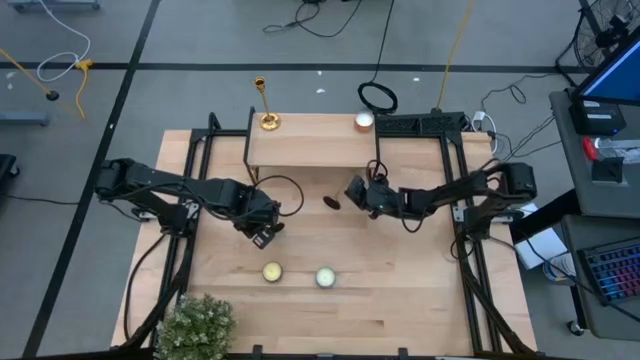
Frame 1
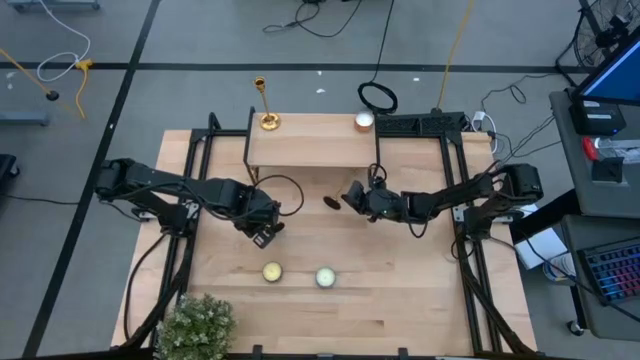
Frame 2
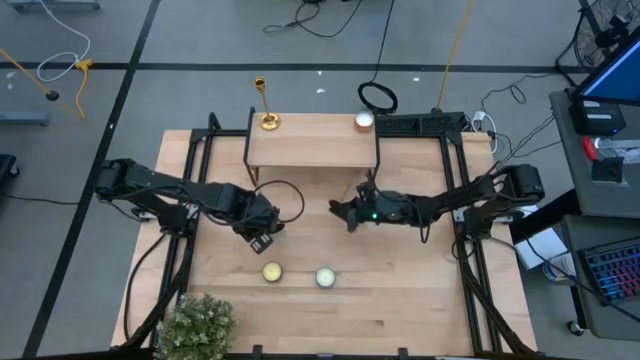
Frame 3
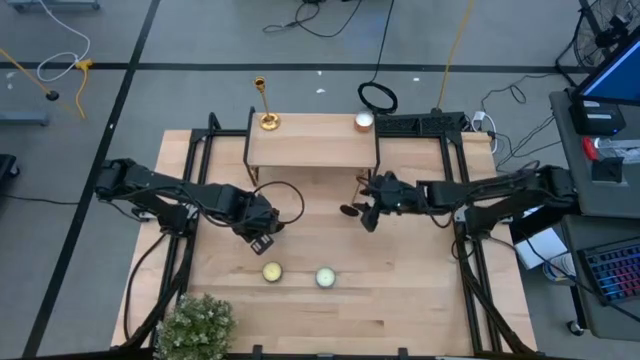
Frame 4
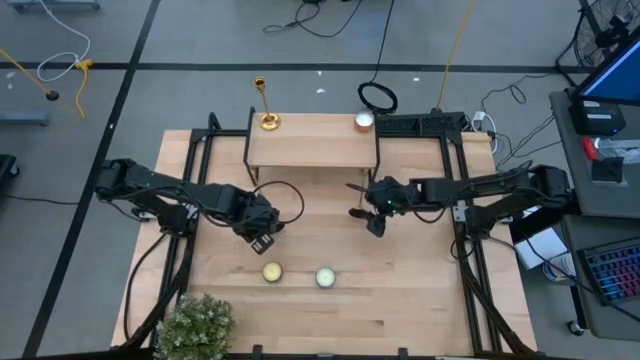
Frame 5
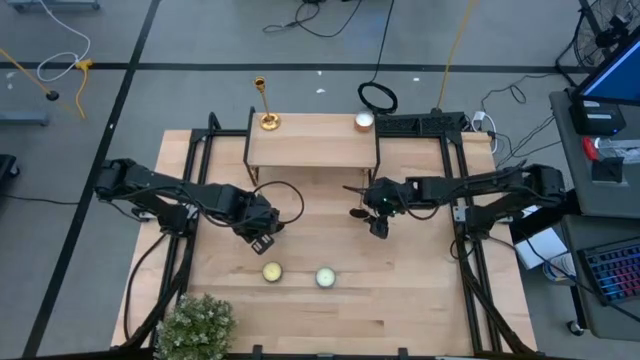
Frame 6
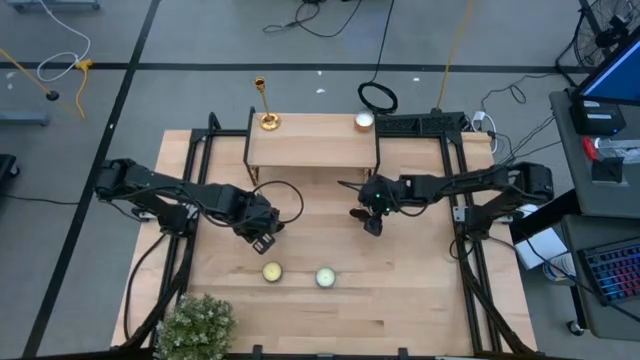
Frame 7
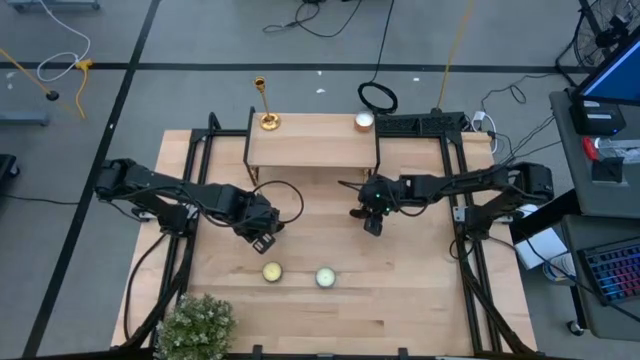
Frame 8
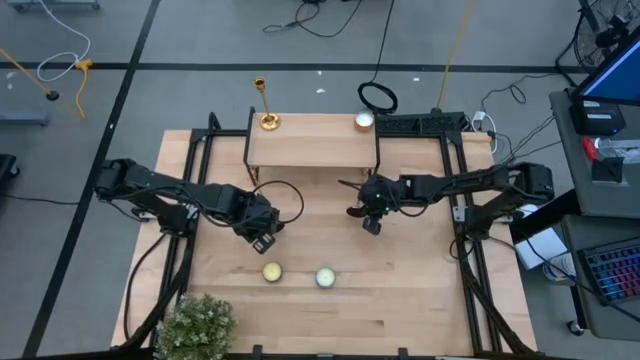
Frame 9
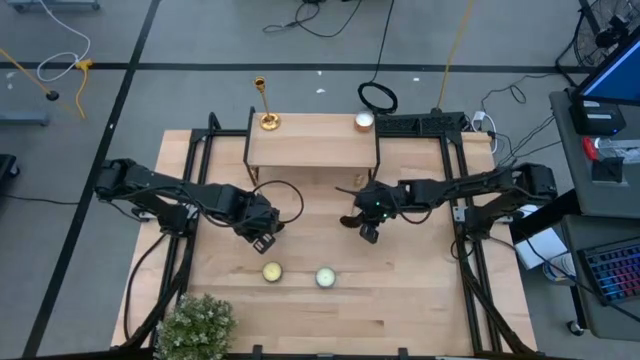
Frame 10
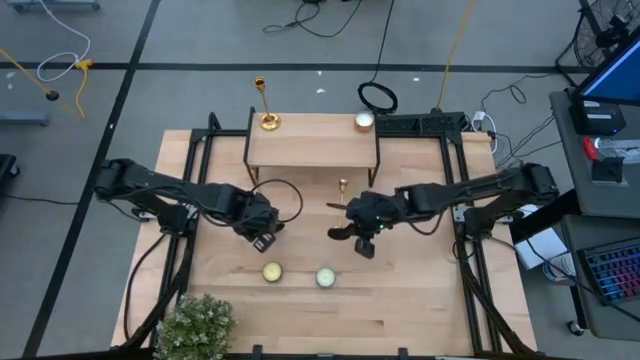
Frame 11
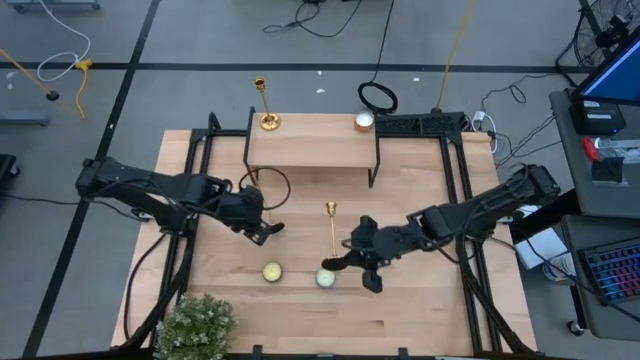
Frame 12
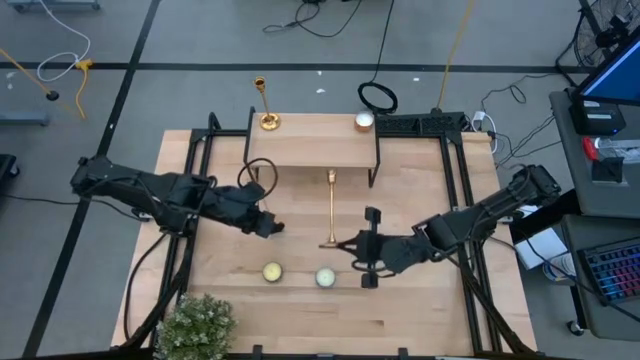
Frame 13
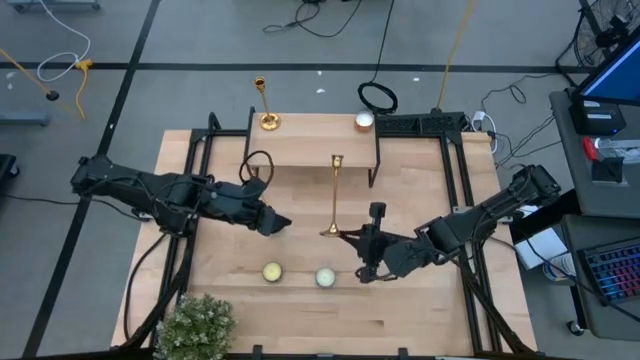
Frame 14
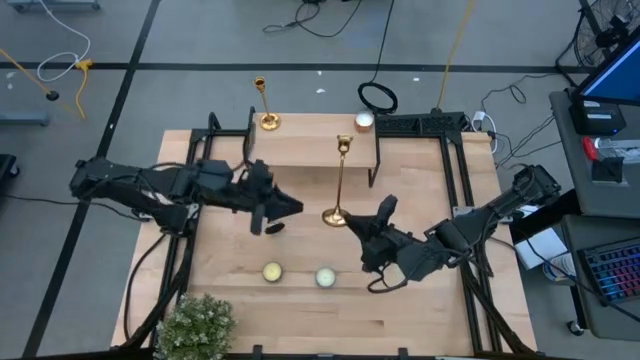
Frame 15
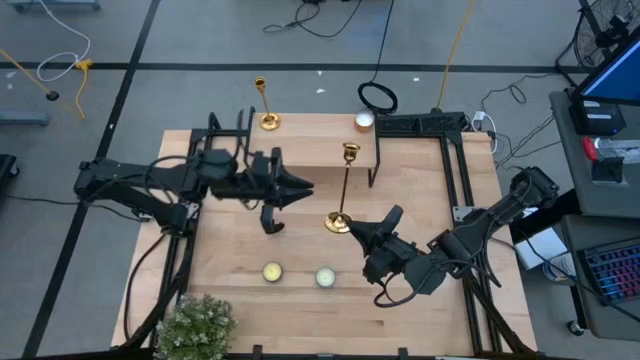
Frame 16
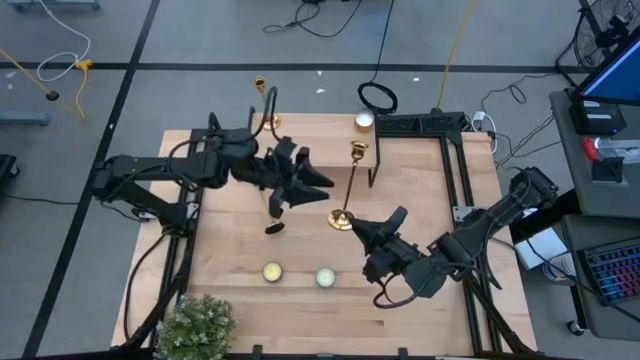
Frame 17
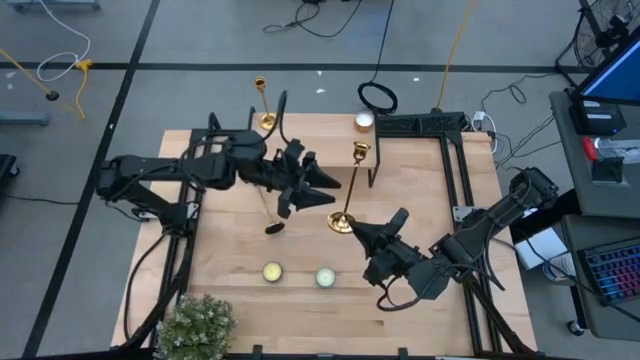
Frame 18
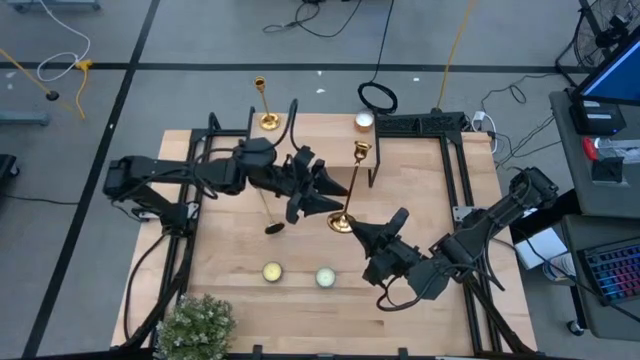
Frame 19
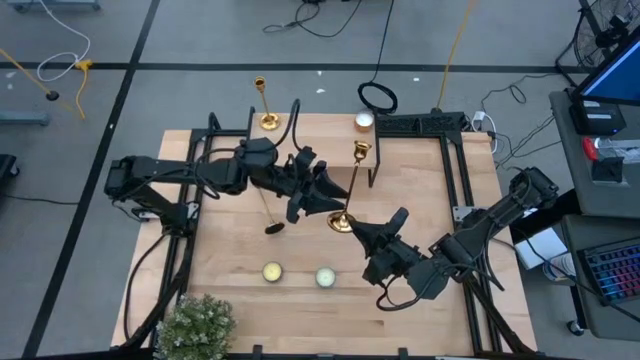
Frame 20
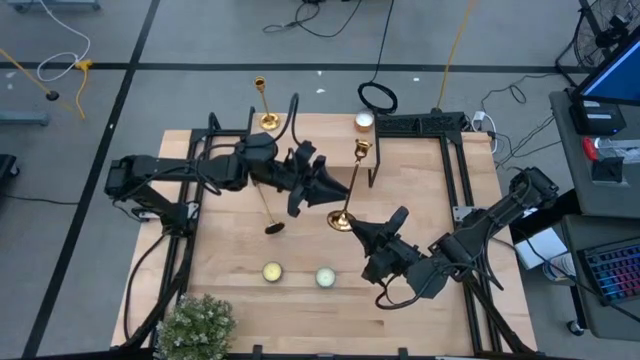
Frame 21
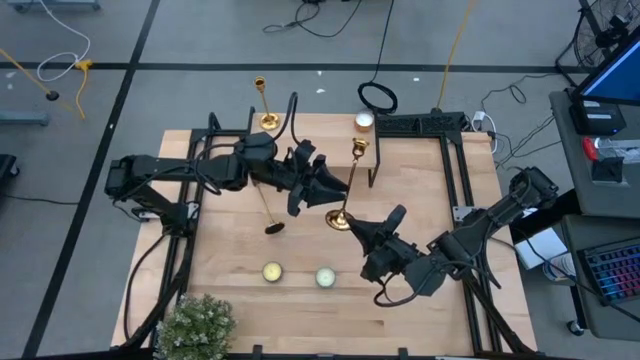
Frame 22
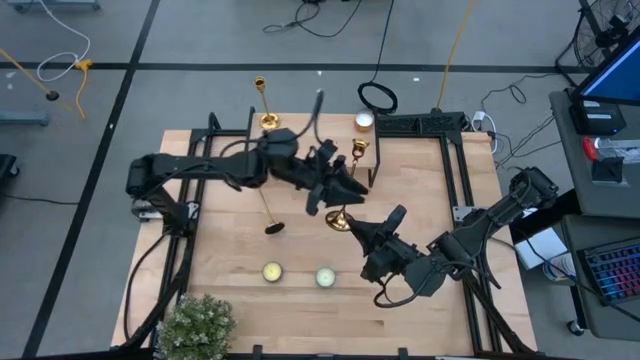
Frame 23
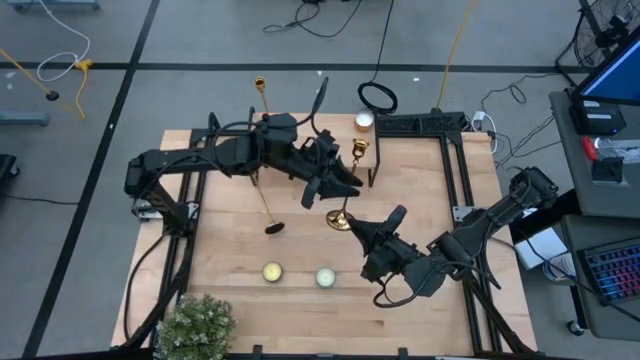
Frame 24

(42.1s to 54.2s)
Task: Pick & Place candle stick holders
Put the right gold candle holder on the shelf aligned with the other gold candle holder

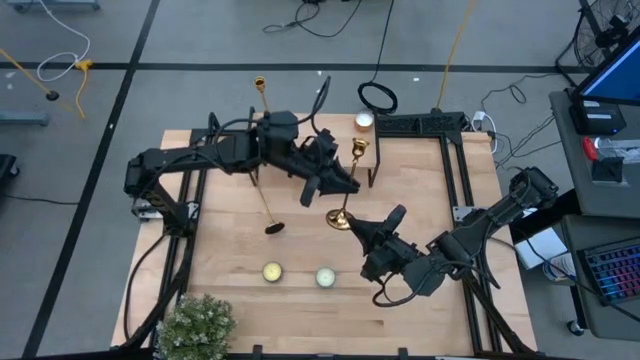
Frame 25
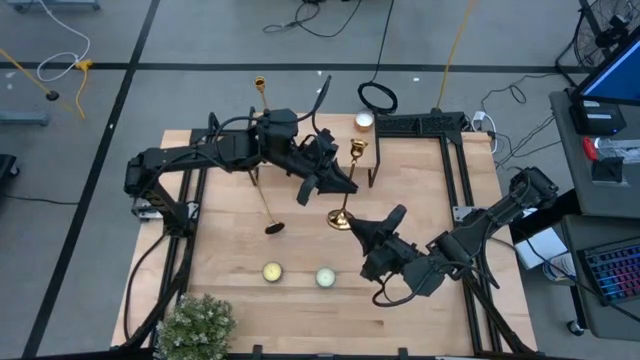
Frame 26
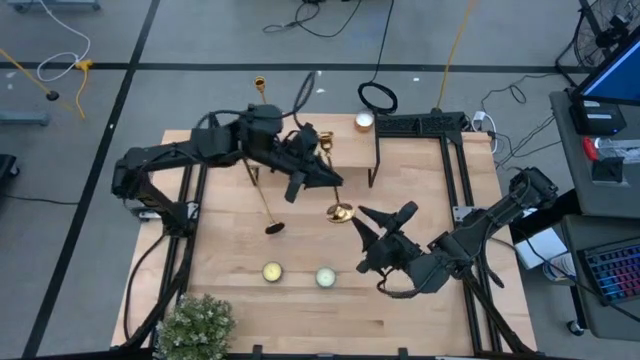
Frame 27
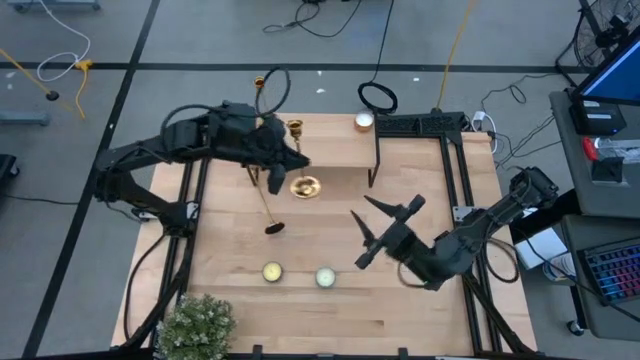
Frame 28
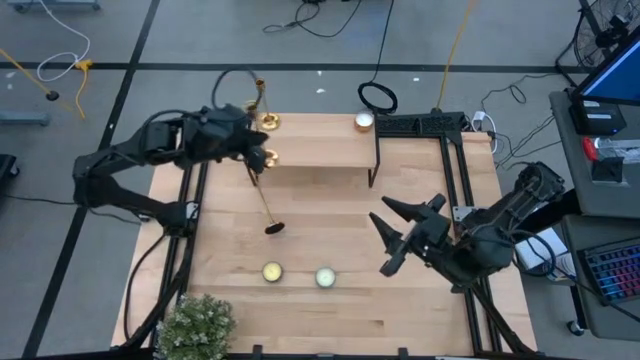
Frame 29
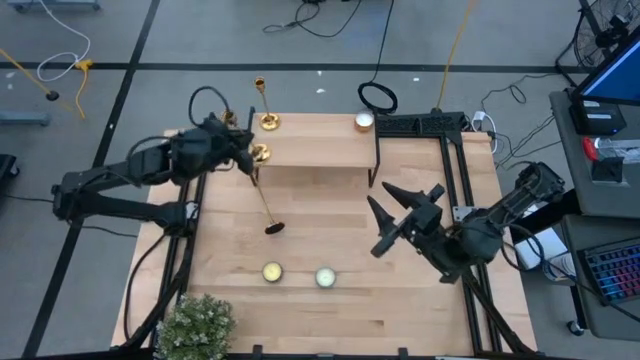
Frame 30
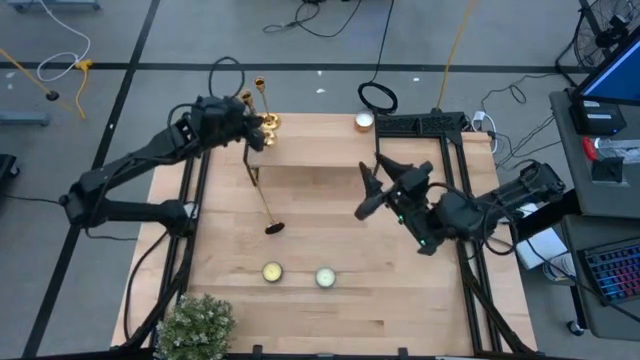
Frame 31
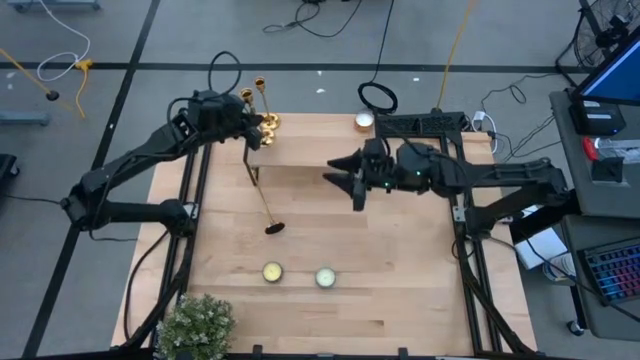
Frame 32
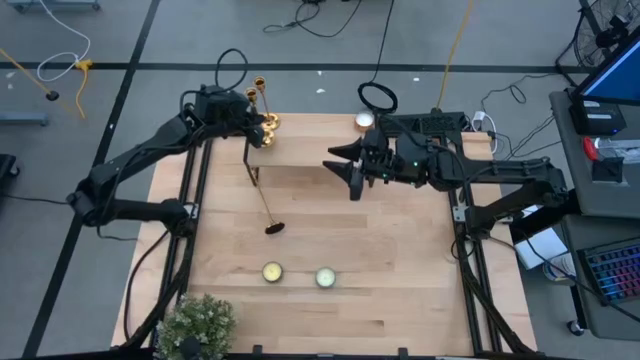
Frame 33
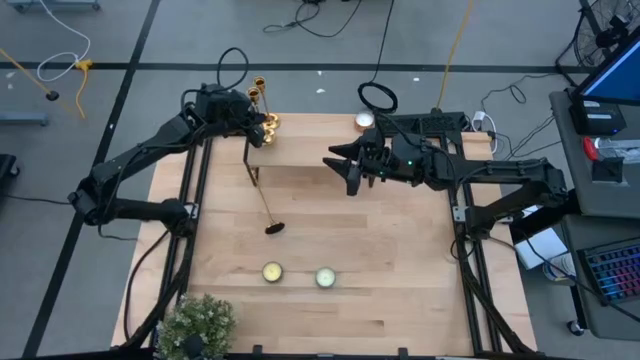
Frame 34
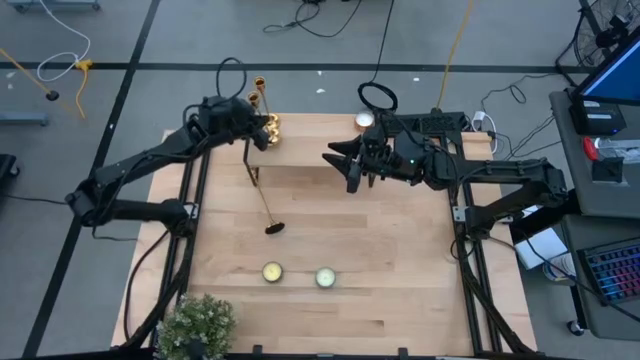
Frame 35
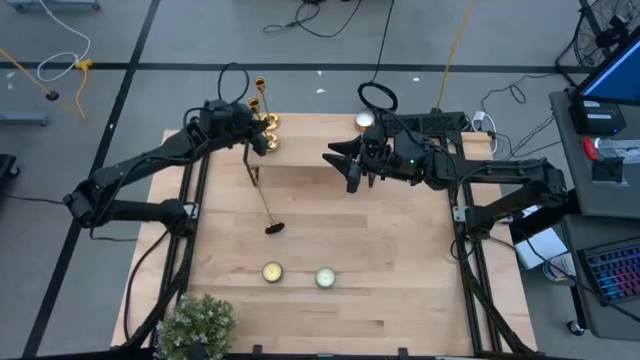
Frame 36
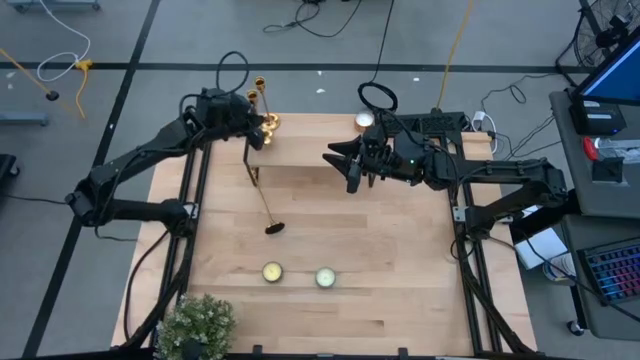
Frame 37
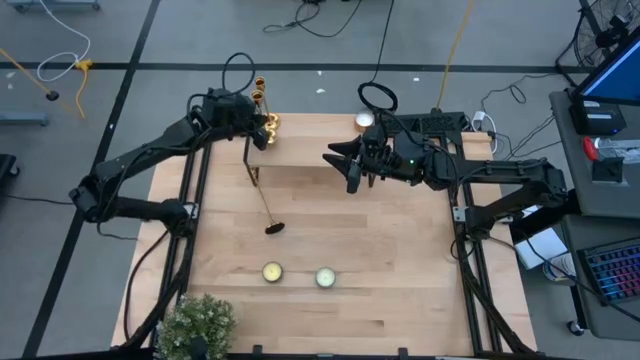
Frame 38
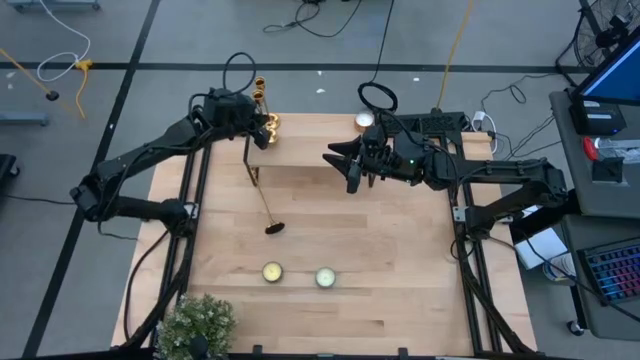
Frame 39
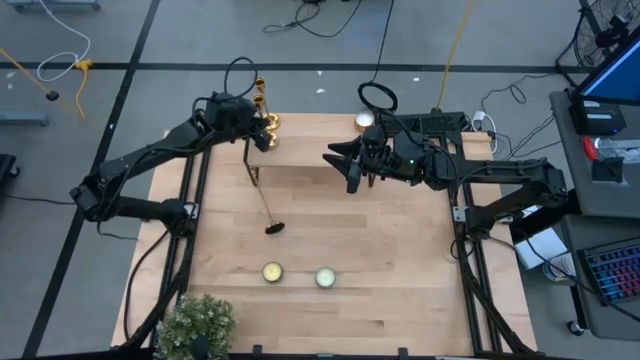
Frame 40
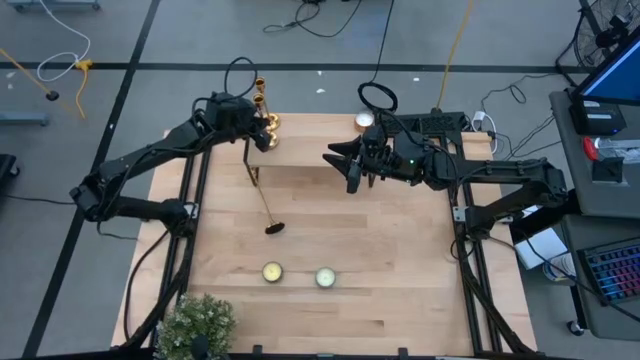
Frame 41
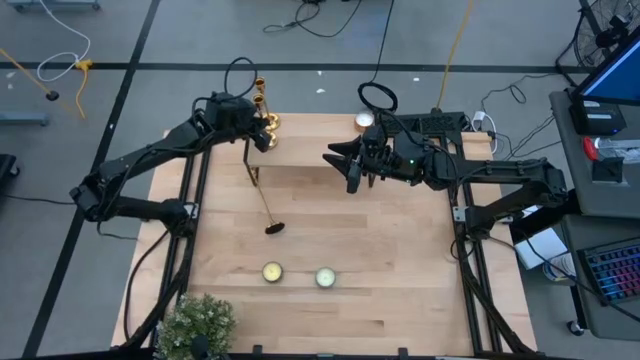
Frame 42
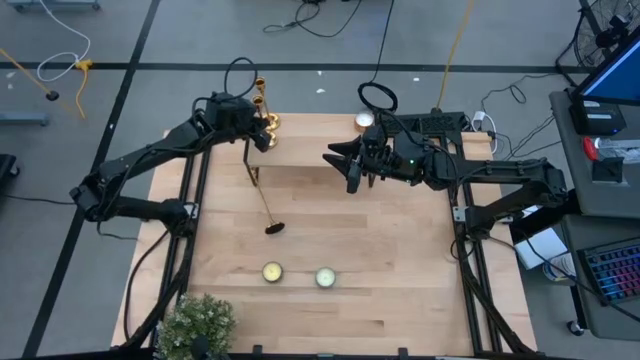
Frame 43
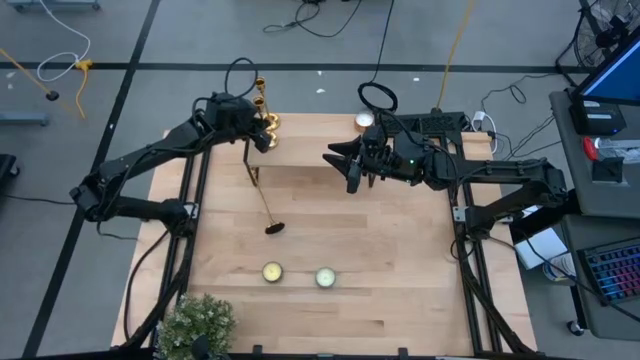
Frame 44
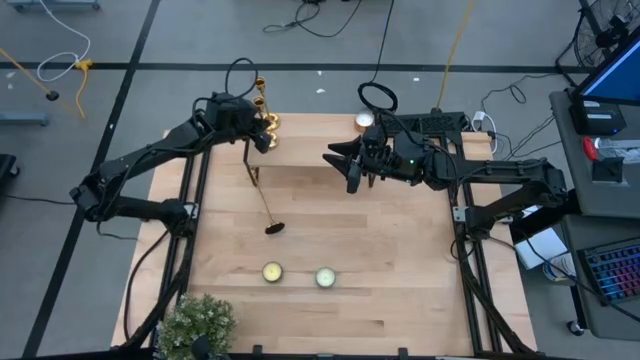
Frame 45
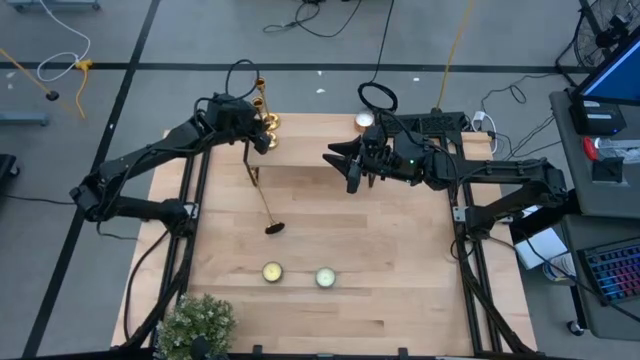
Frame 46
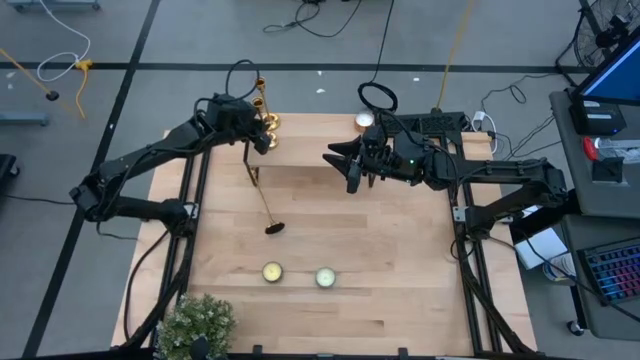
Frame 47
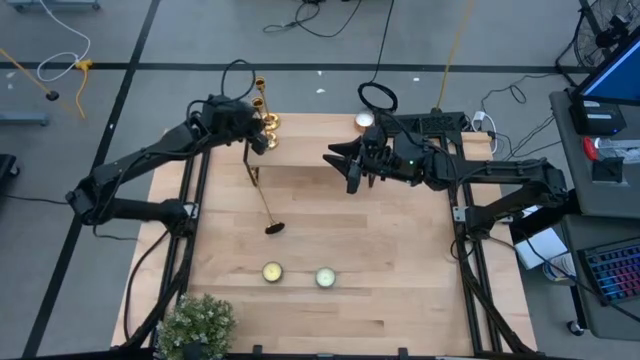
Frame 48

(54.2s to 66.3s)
Put the right gold candle holder on the shelf aligned with the other gold candle holder
